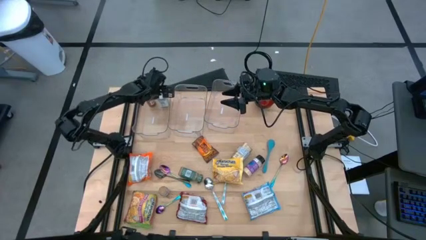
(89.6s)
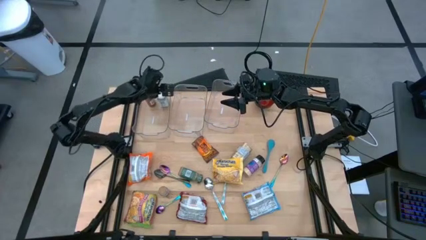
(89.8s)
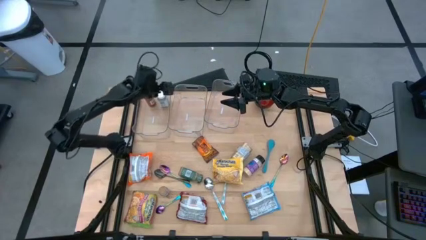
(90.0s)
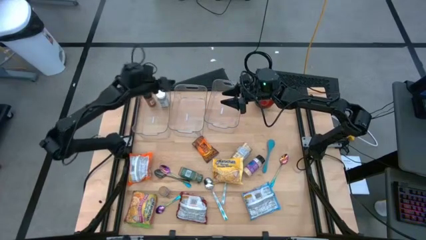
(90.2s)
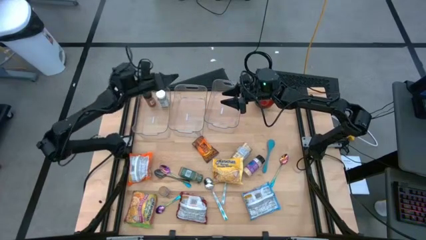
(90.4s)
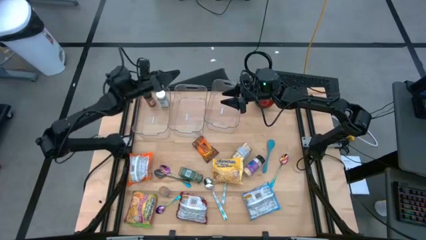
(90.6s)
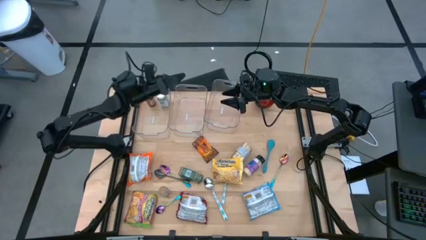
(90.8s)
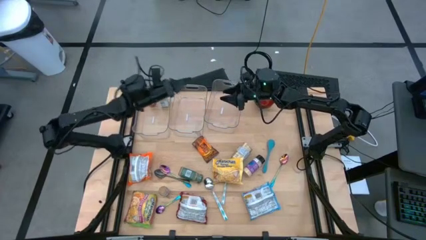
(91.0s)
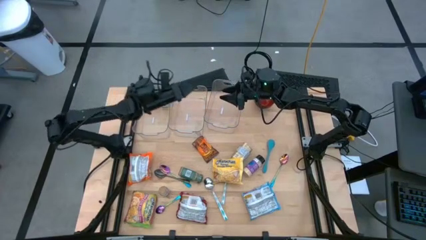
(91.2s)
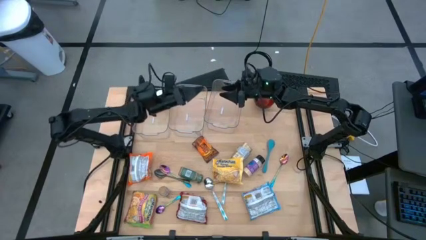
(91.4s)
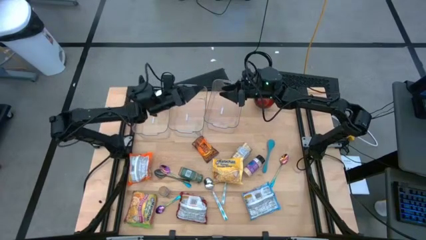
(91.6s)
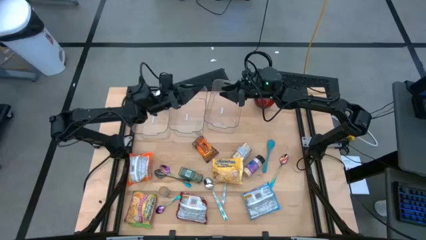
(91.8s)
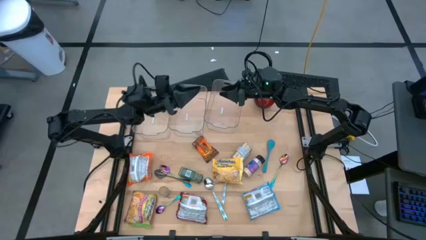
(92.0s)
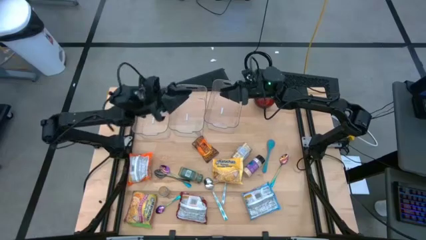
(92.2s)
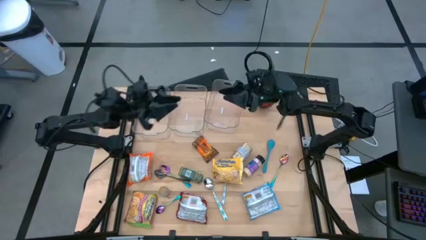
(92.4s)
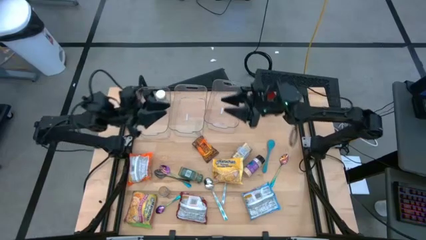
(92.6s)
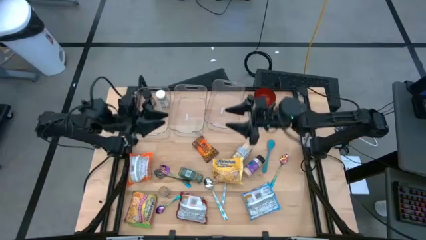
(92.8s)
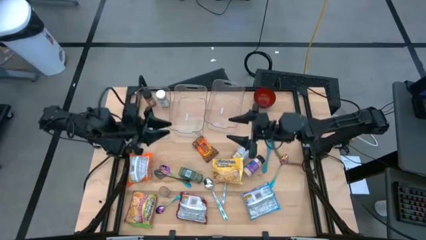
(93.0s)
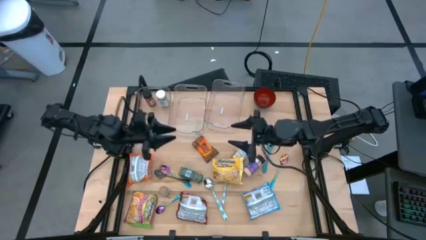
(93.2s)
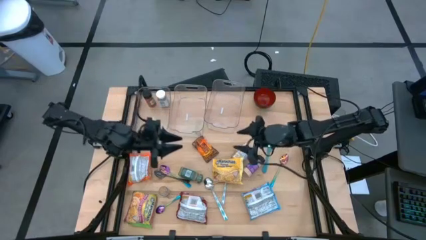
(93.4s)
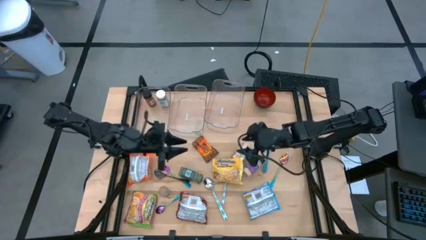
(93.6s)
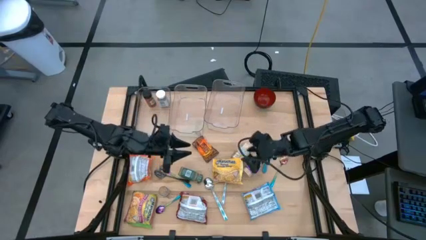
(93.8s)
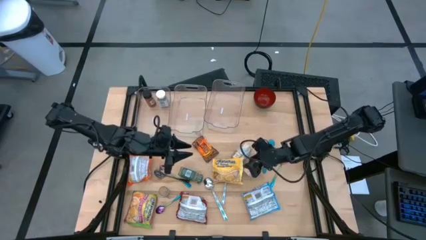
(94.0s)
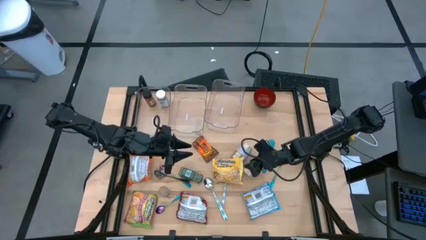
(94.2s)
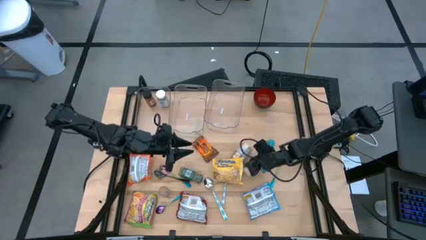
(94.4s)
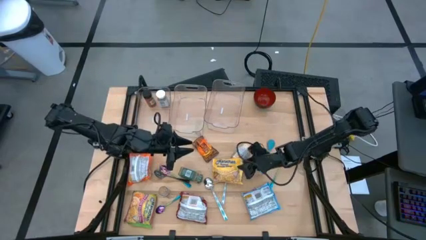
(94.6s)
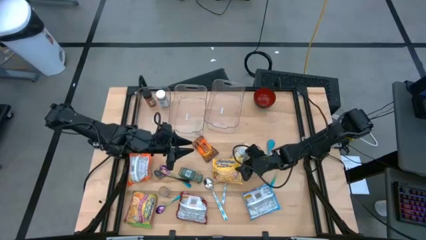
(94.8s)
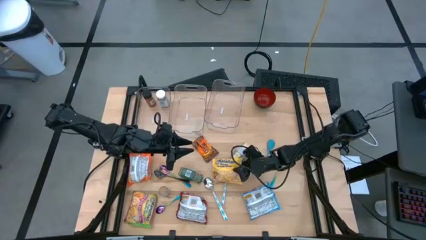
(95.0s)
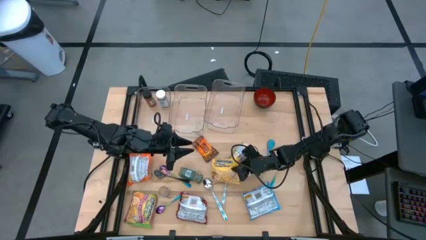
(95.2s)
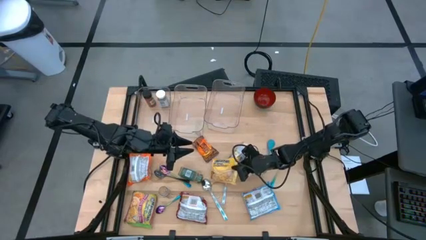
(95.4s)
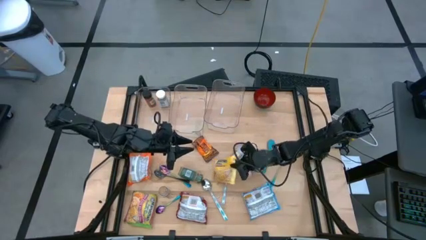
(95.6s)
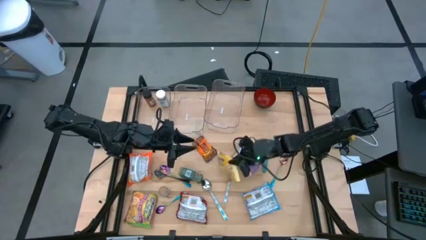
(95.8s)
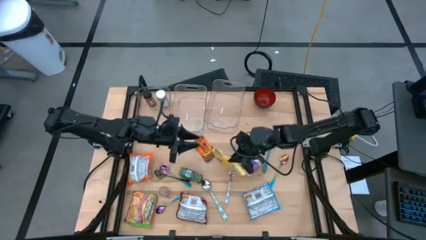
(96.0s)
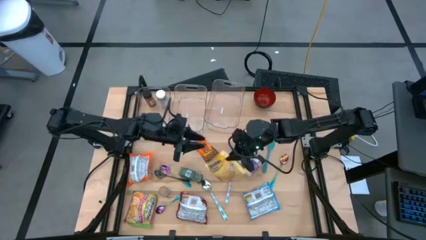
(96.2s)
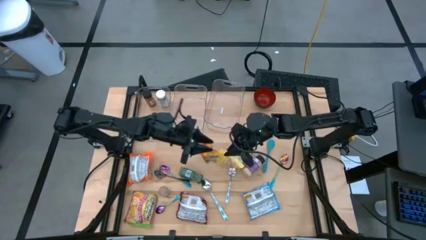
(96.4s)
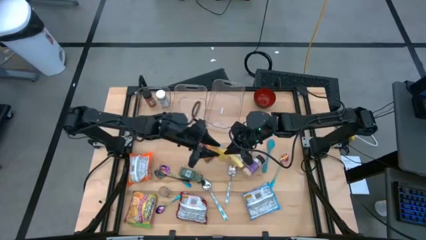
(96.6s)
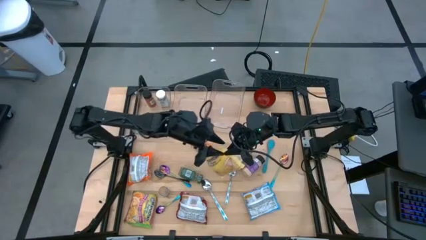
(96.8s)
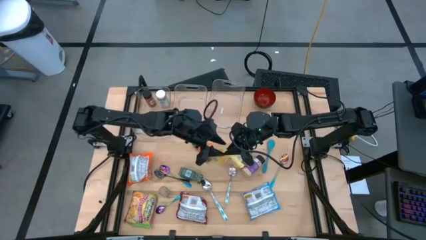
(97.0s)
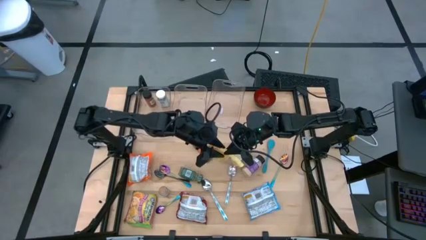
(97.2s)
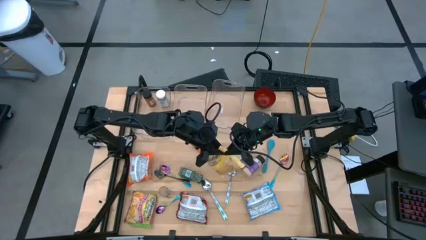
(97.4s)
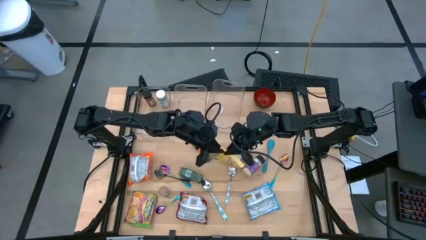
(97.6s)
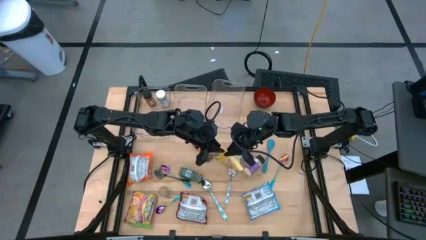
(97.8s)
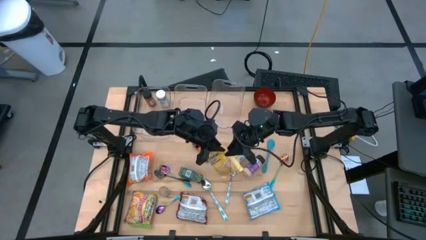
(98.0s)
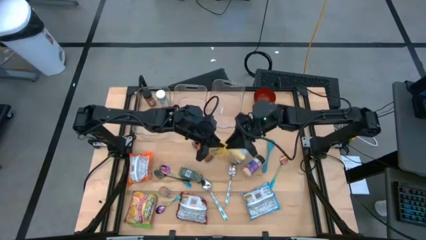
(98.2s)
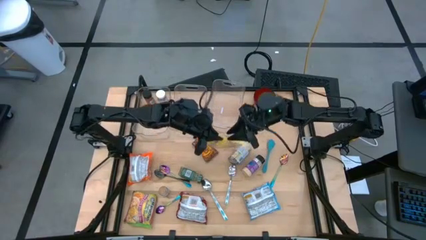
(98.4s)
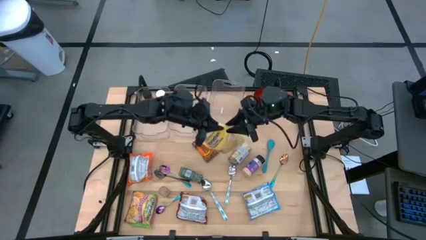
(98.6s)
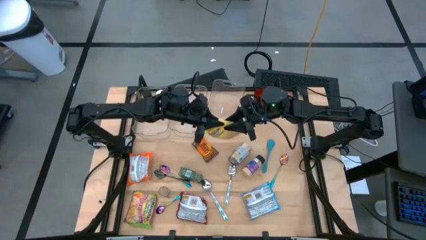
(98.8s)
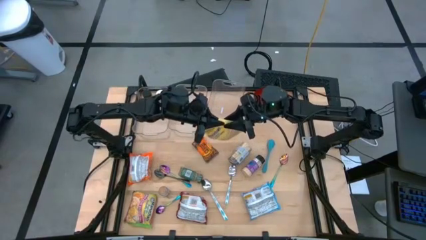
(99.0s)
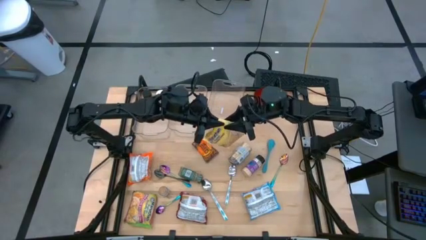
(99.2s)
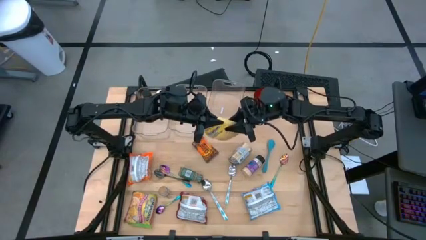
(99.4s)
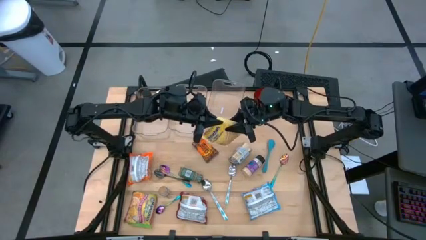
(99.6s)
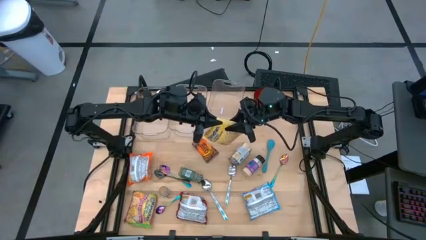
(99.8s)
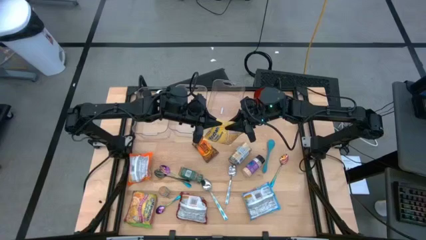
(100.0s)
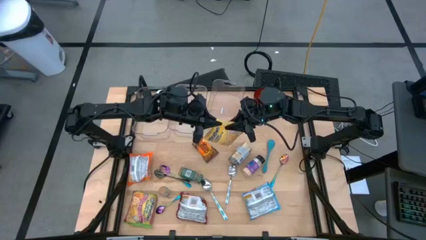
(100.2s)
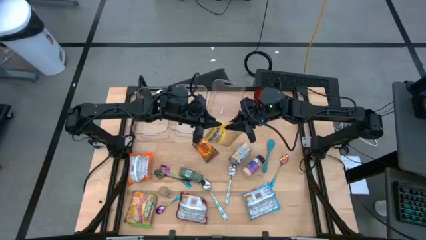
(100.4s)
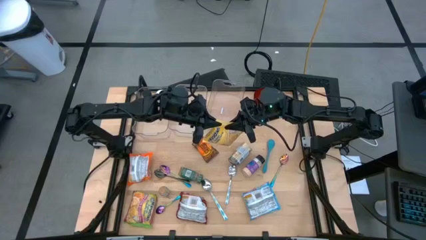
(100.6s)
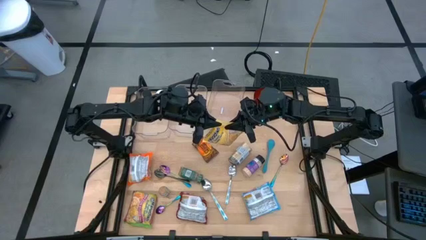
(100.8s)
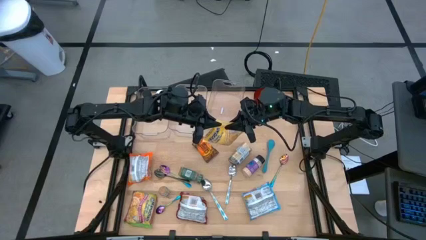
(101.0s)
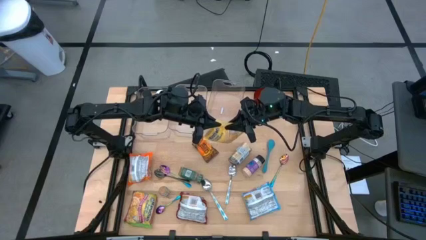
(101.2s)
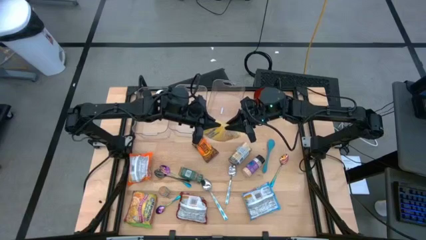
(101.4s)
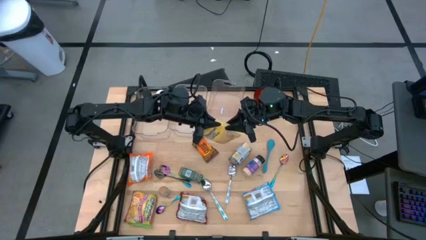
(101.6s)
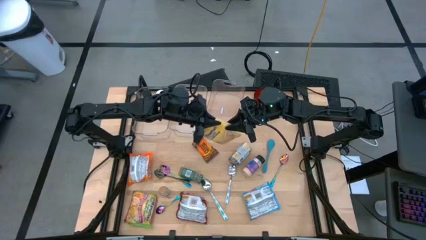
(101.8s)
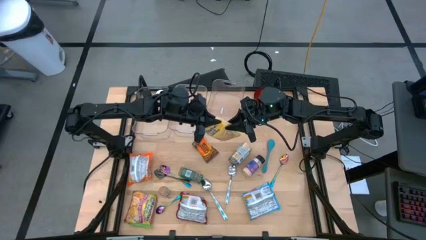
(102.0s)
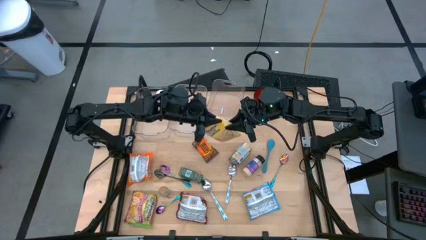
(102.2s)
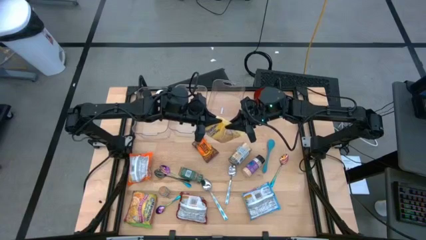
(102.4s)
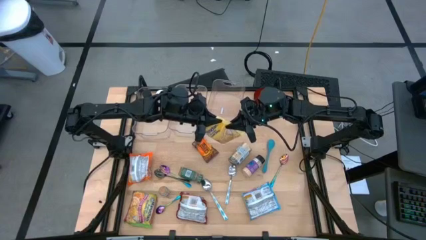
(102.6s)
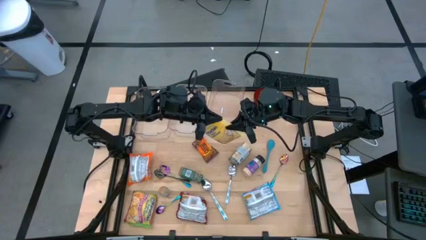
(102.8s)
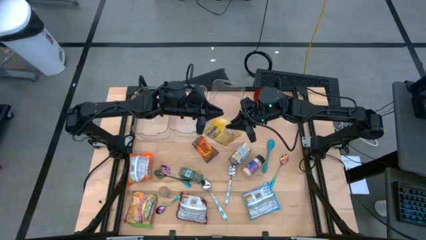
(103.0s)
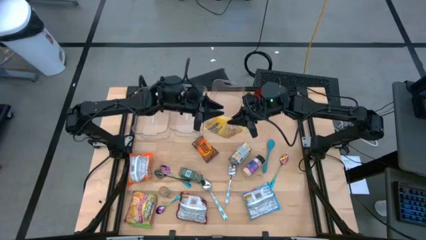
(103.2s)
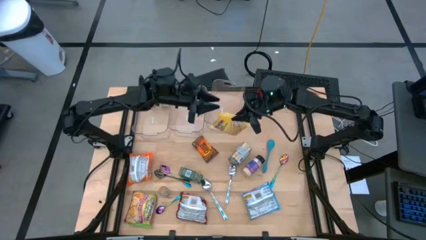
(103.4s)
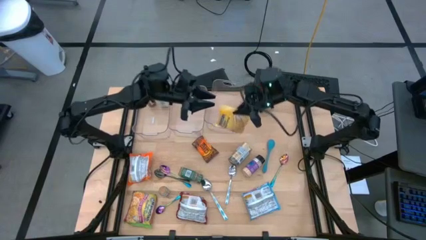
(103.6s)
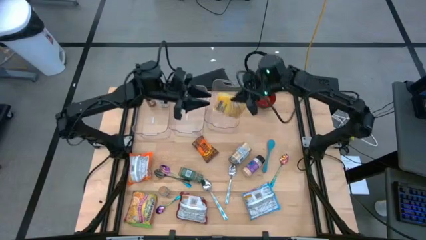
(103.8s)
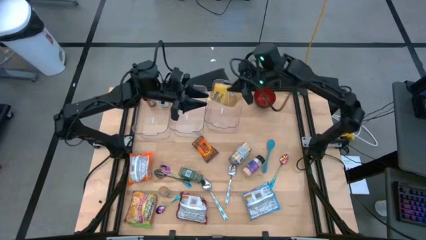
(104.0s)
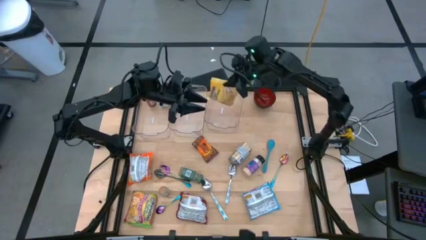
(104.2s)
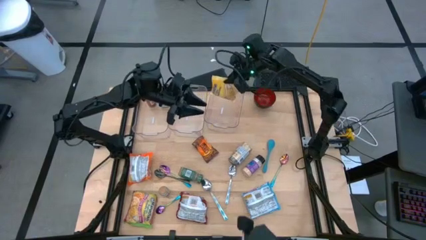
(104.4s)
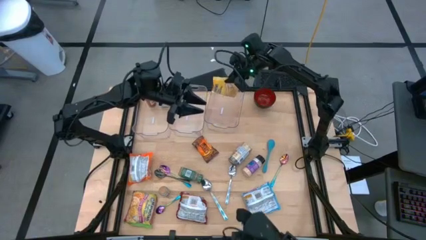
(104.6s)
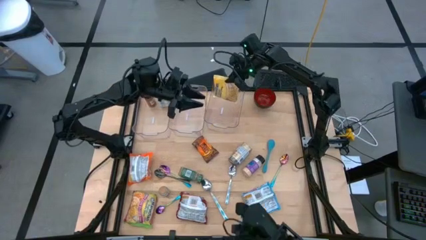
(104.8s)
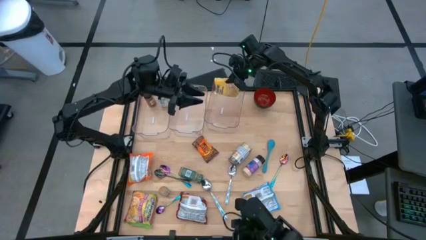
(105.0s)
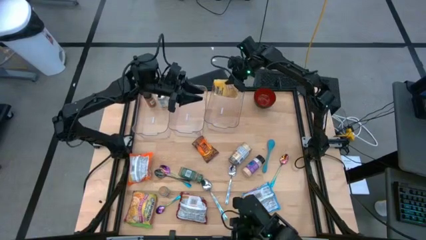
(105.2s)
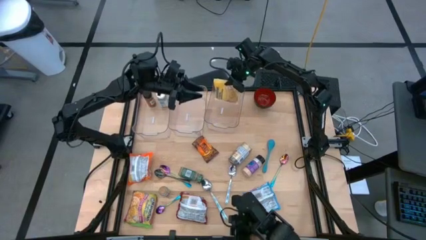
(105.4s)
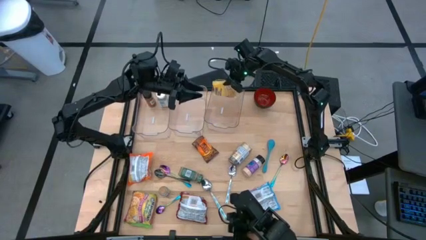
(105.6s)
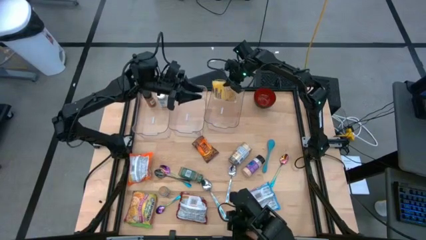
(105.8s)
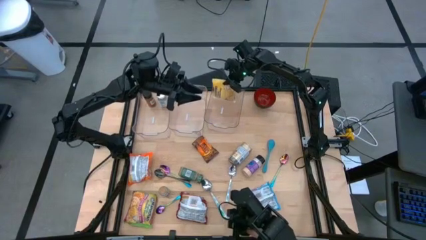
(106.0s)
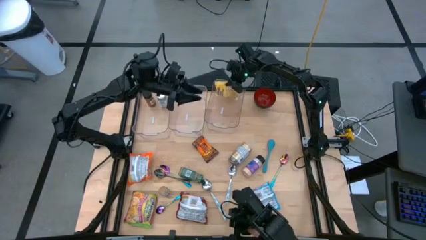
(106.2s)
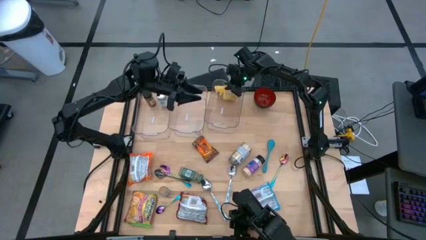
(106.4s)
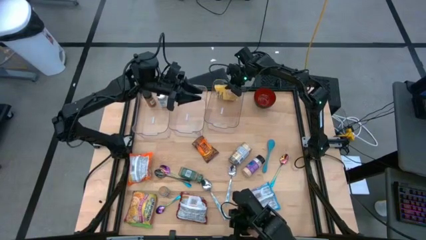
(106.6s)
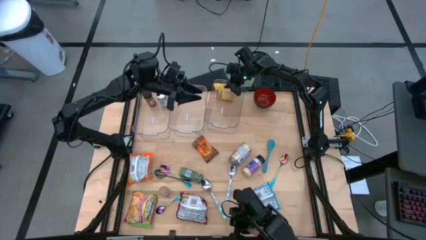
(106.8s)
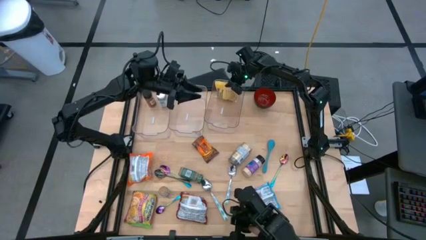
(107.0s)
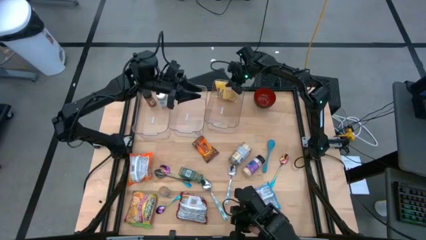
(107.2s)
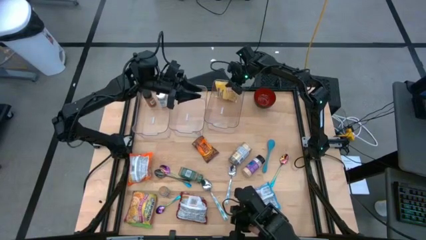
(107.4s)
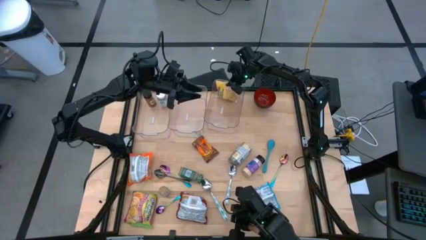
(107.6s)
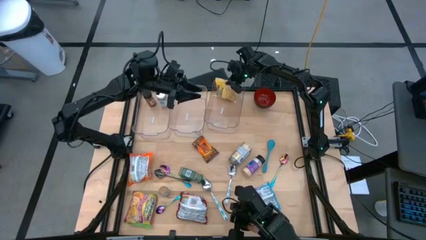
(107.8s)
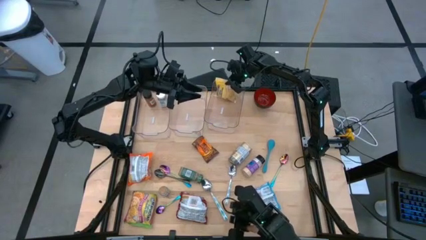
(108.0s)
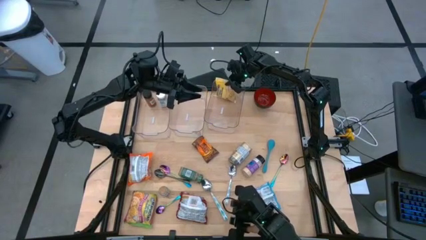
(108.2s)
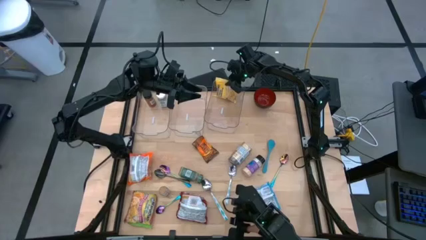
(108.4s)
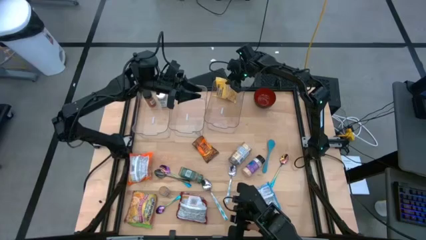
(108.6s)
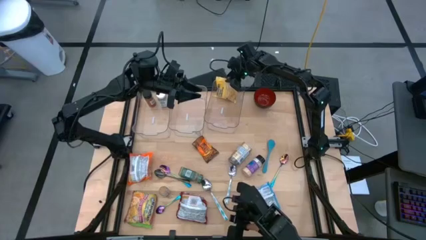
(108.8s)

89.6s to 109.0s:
Task: Pick & Place Food Item
Put the yellow noodle pack into the right transparent bin
